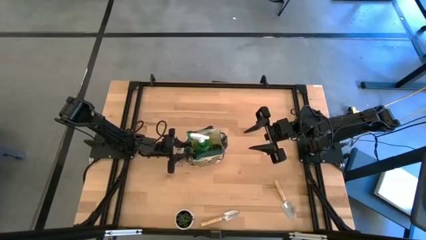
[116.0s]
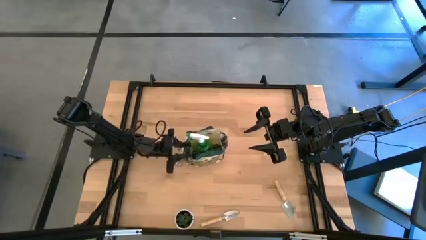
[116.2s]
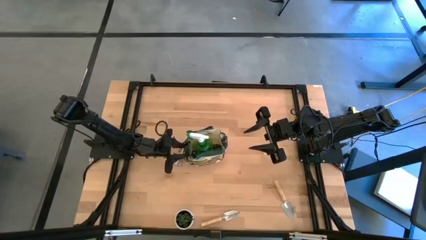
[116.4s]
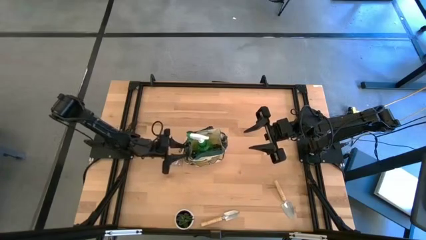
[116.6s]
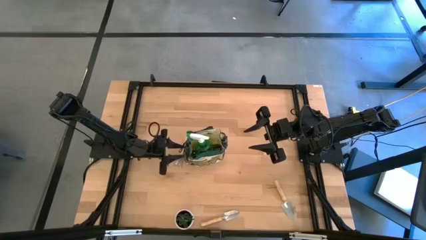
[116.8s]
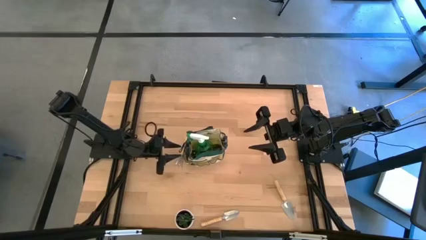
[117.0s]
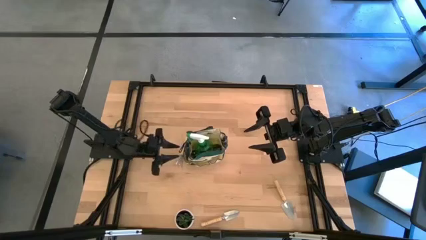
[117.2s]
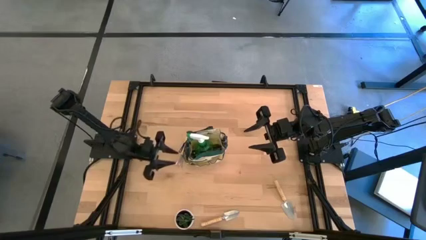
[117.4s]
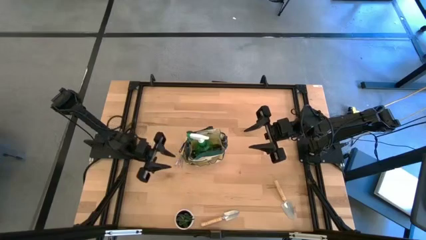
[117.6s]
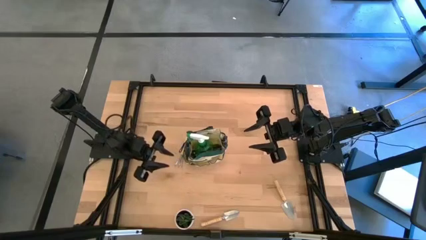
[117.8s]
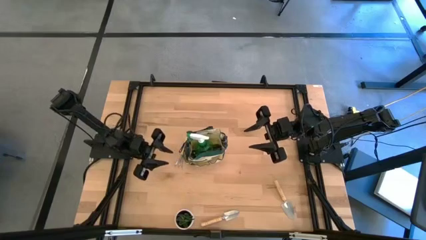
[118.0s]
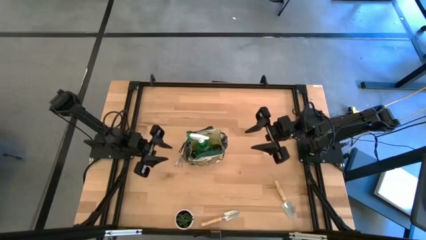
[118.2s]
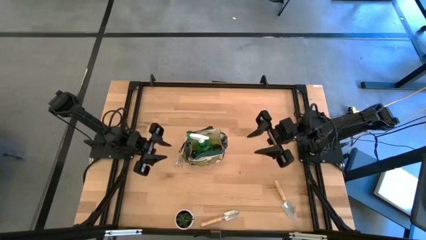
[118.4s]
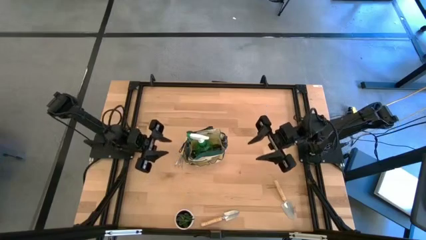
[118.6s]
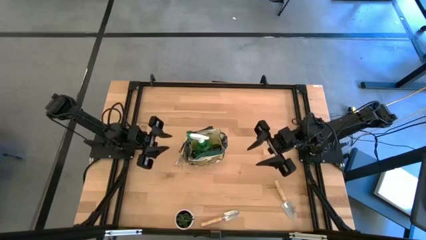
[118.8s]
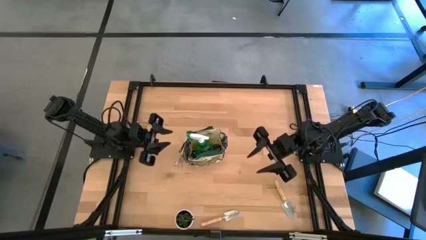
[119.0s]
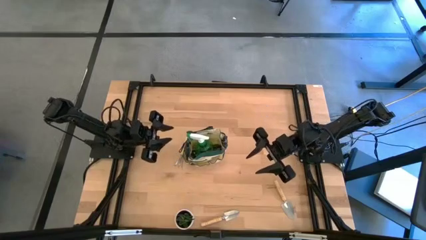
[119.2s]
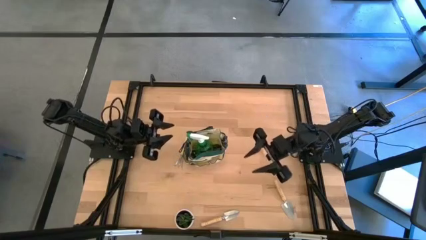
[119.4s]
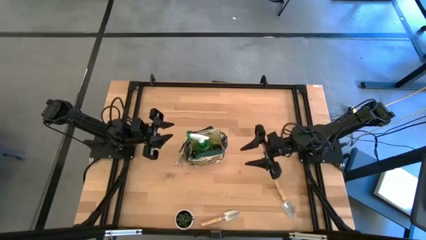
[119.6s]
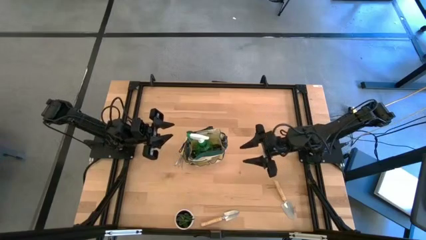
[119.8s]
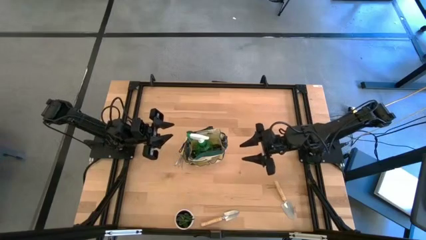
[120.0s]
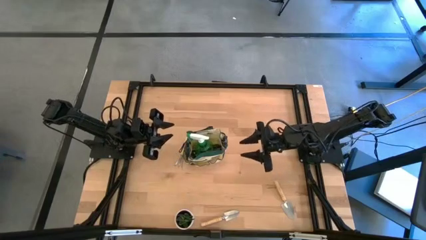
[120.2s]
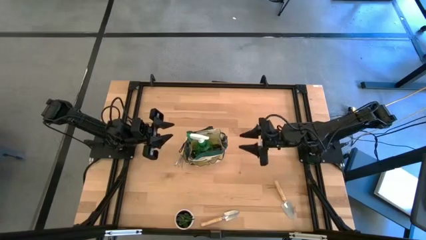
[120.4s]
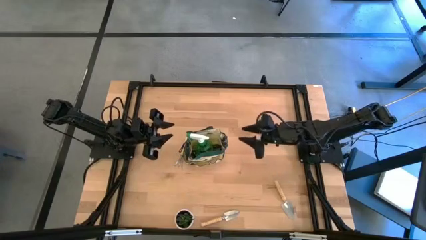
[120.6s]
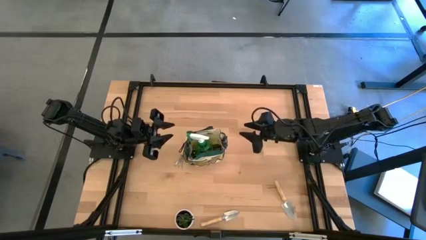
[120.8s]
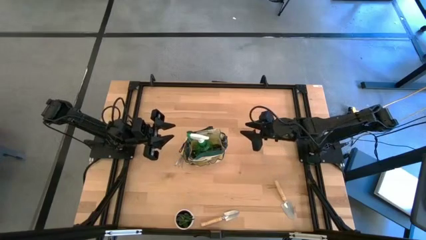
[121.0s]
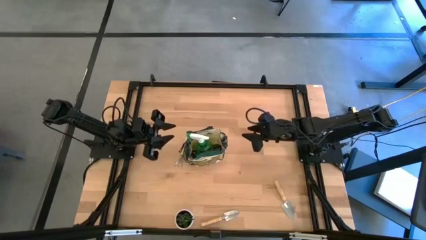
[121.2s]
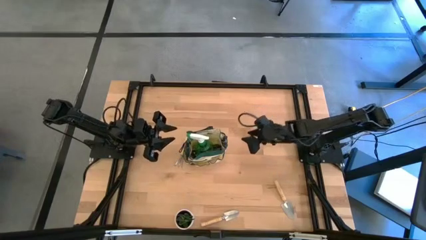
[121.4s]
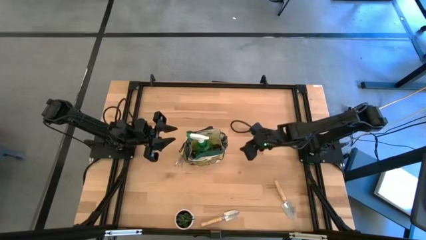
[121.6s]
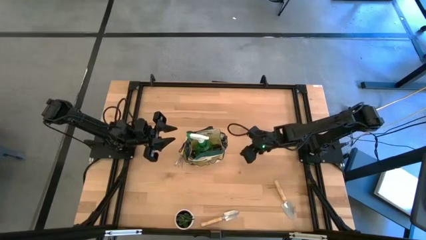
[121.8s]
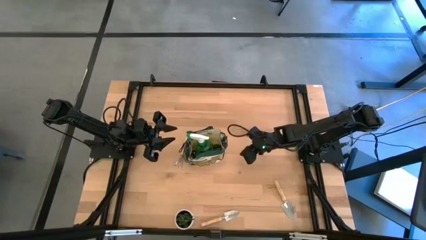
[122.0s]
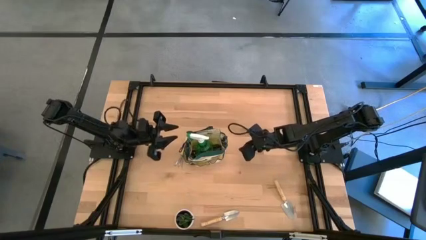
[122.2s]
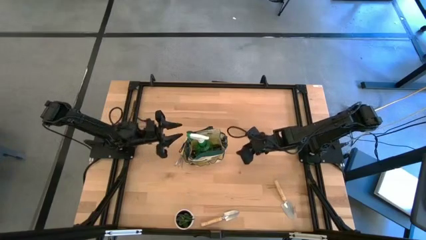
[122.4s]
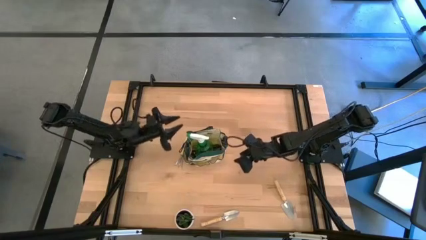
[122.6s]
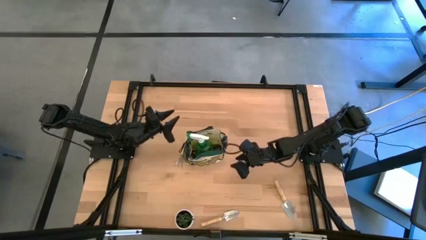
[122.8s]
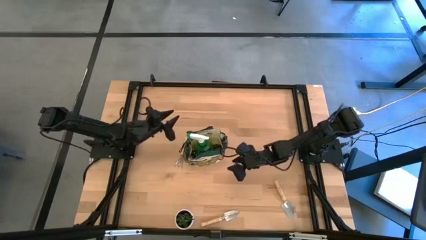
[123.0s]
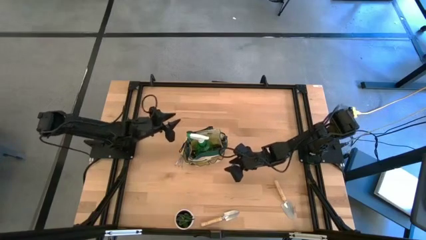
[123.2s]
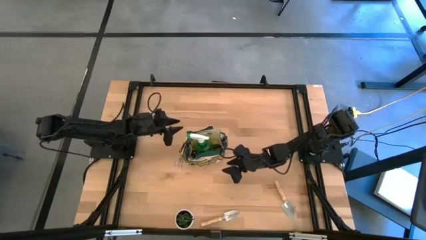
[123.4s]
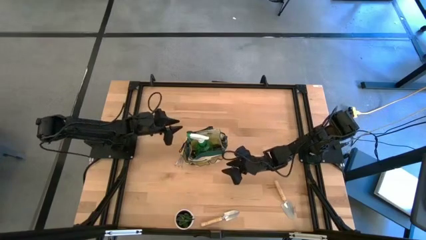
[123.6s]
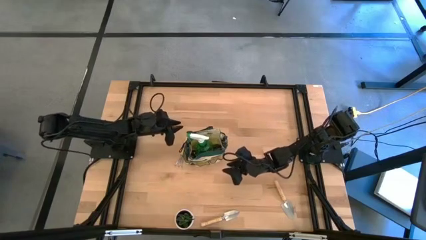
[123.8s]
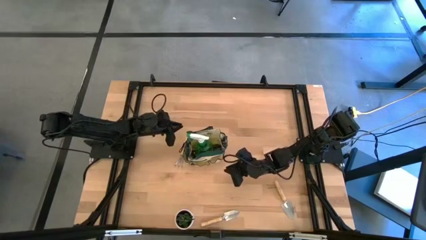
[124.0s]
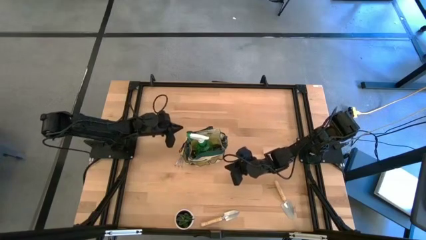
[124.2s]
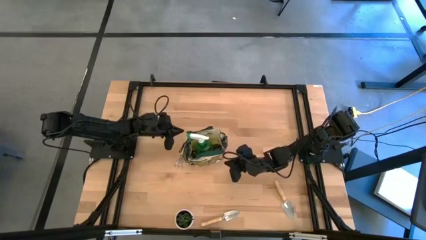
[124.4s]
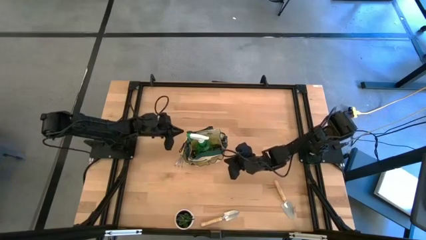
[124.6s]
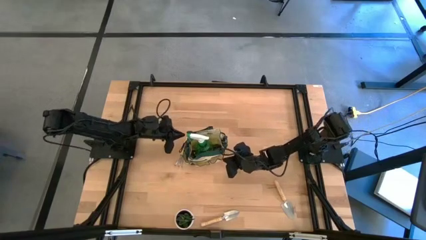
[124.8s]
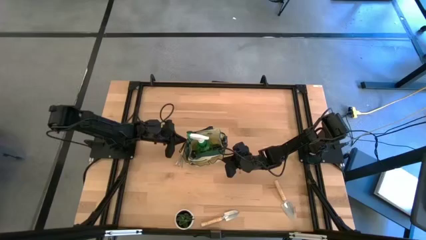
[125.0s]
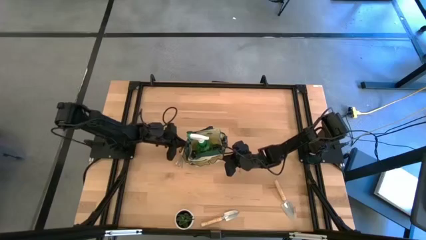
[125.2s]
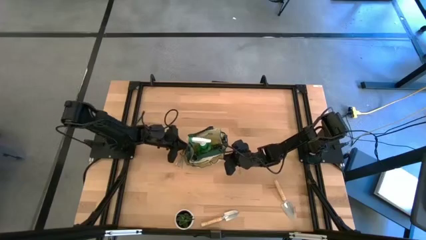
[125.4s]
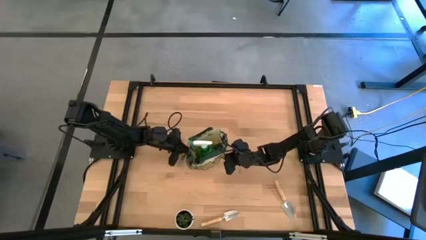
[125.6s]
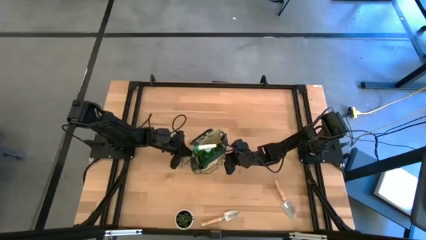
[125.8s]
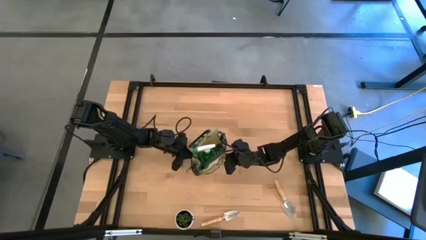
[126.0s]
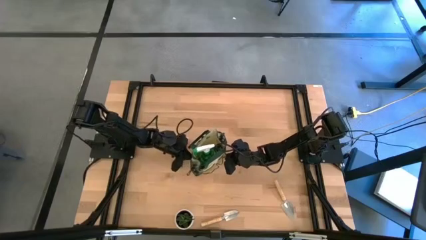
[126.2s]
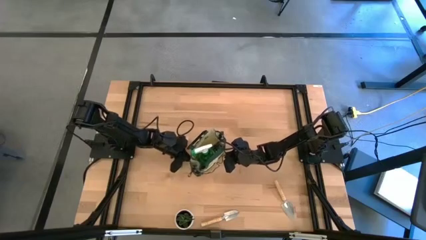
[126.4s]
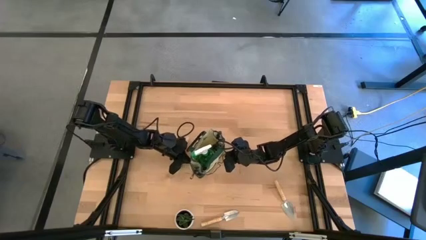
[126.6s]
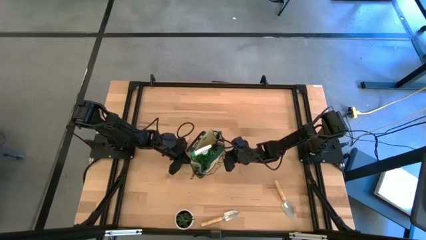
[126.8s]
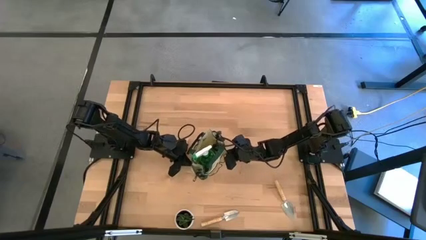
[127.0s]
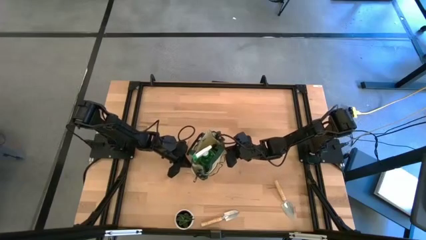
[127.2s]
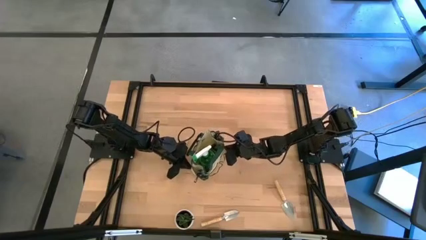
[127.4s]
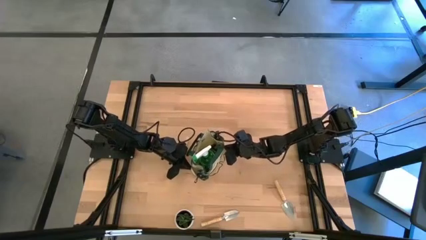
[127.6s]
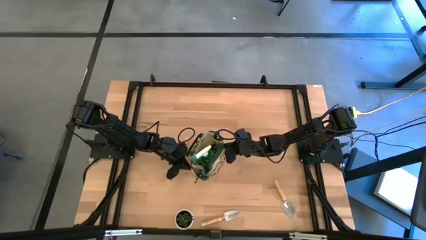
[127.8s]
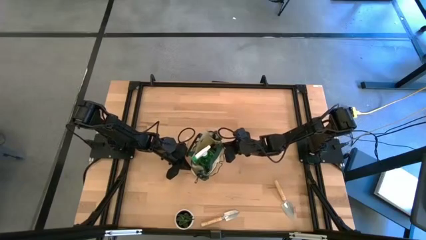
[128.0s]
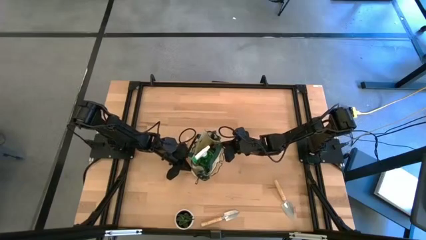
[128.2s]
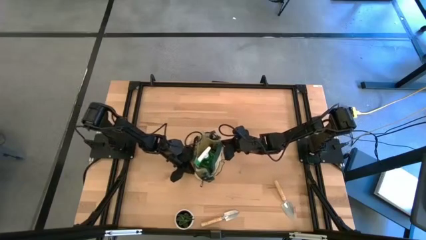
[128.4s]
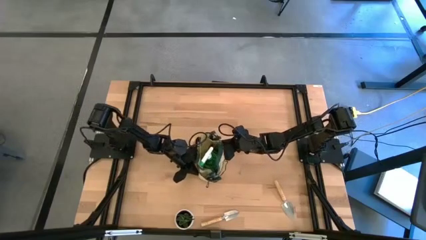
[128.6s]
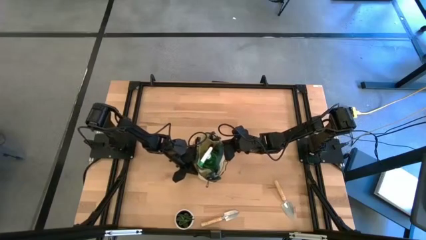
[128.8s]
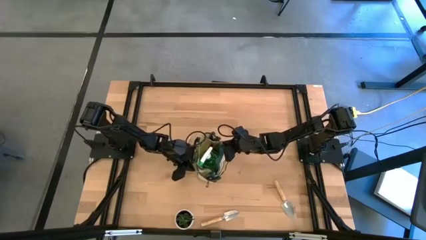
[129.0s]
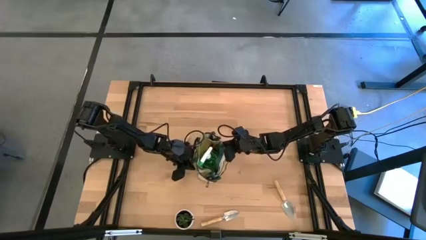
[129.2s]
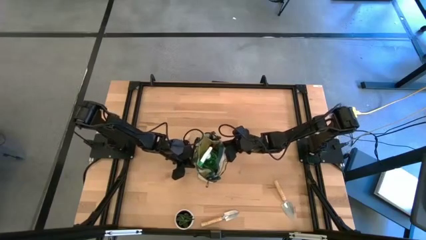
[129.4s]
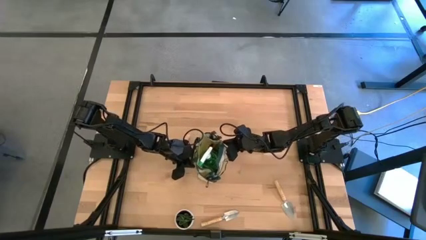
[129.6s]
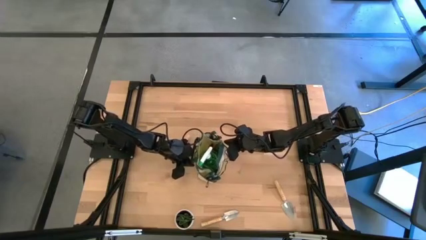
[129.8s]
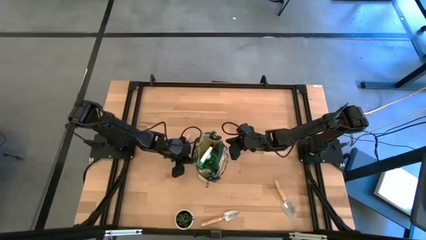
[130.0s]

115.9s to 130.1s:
Task: Pick & Place Garden tools in Gardening bag
Adjust the green gardening bag

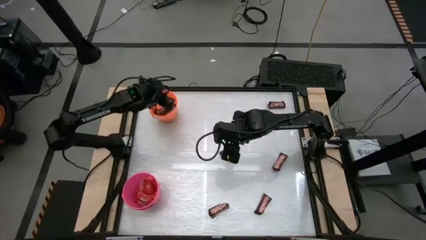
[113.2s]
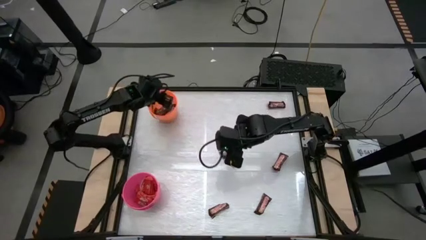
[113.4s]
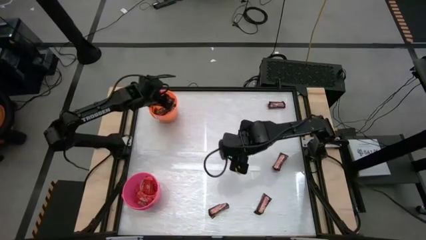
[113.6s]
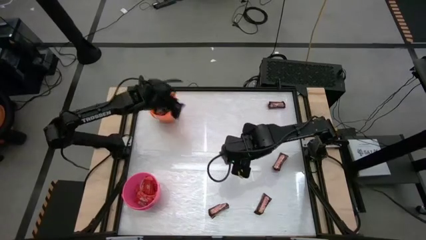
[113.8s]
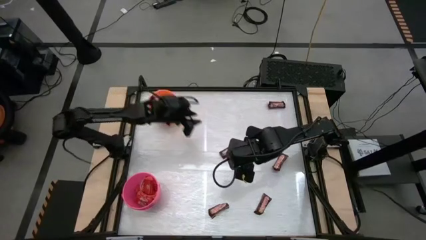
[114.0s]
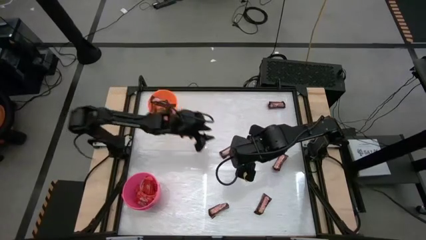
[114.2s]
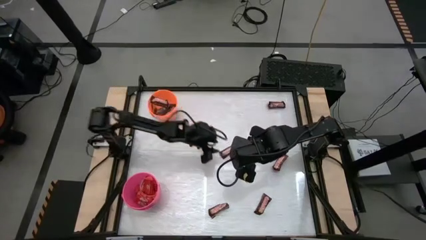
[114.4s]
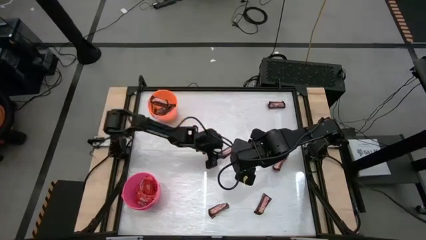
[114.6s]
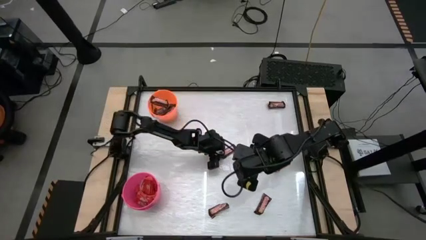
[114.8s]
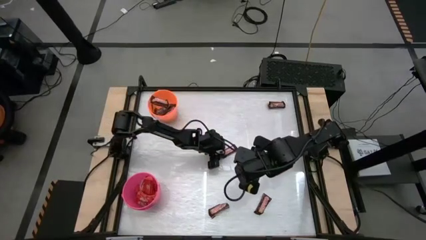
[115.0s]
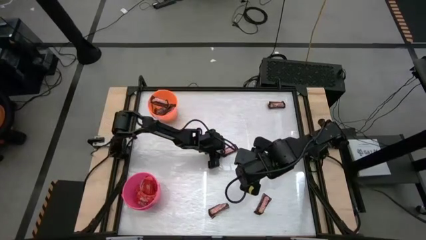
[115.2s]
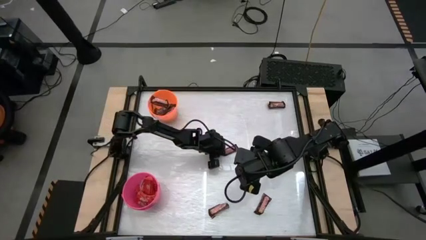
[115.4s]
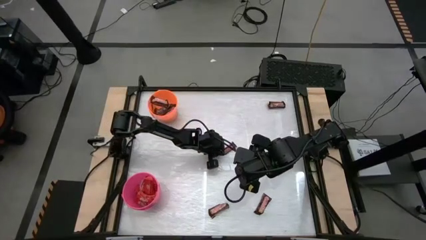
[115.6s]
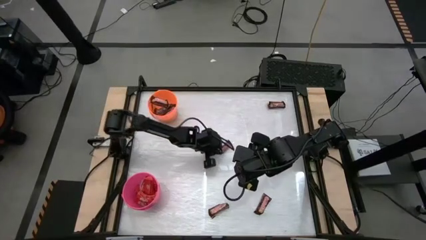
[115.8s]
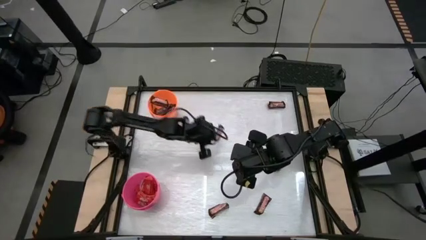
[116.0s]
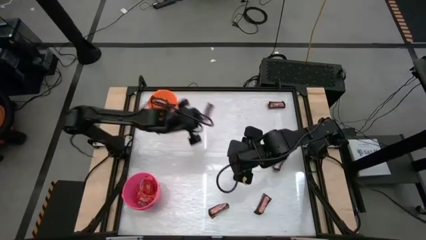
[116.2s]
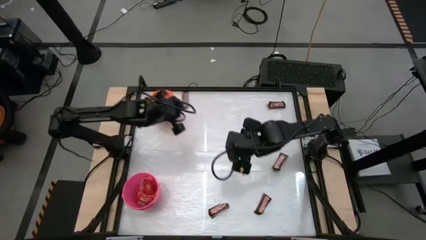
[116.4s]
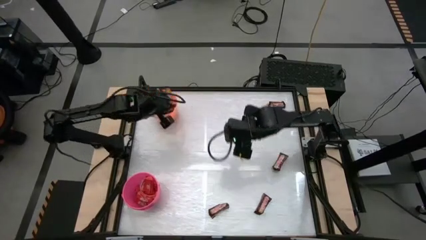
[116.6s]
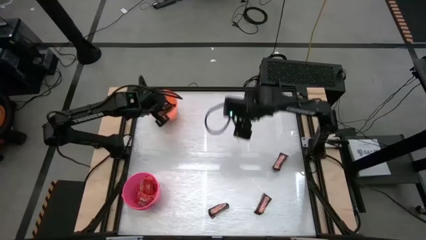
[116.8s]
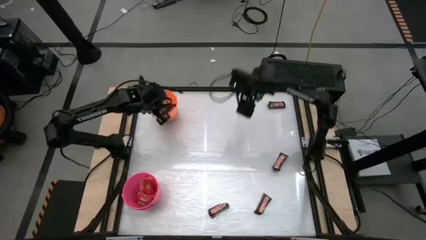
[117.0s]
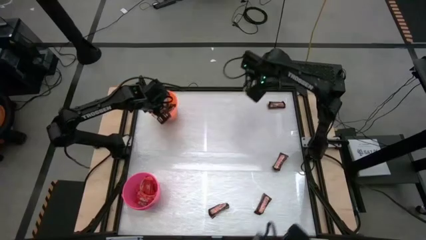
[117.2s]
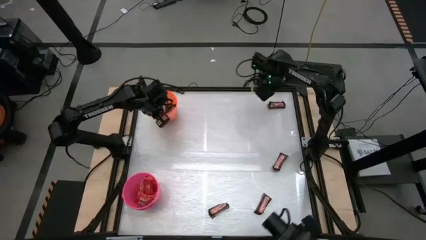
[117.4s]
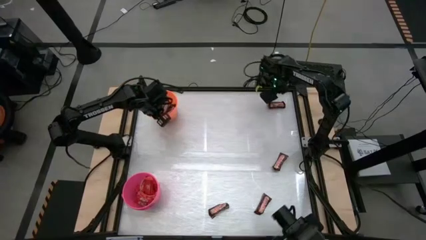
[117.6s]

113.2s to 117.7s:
Task: Sort candy by brand, put in halloween buckets
Put the brown chocolate bar into the orange bucket
